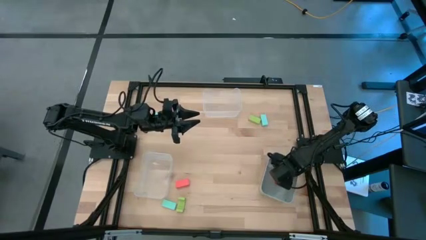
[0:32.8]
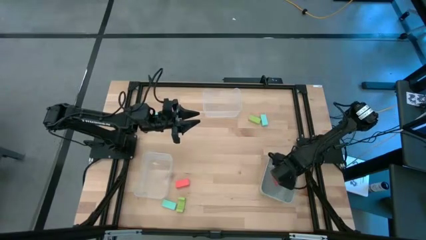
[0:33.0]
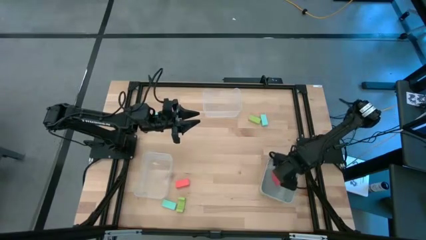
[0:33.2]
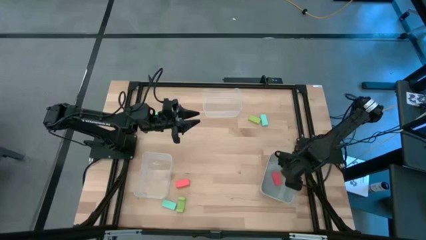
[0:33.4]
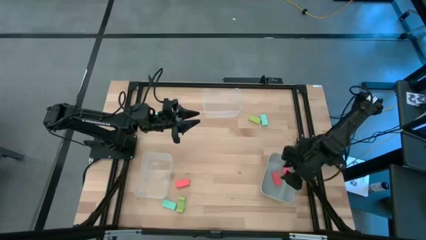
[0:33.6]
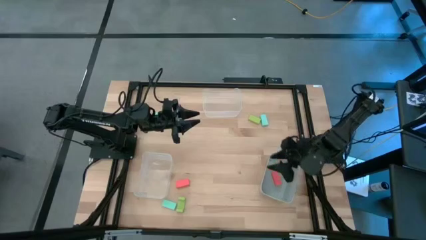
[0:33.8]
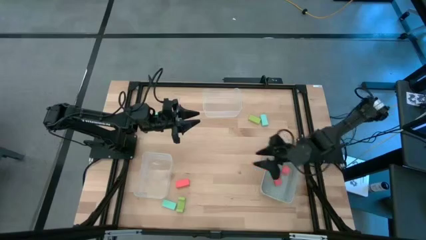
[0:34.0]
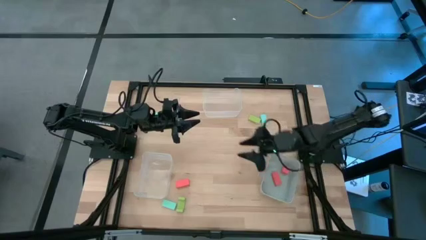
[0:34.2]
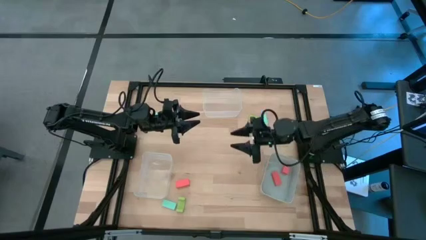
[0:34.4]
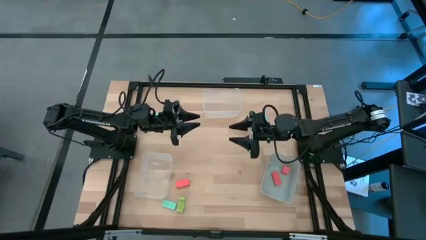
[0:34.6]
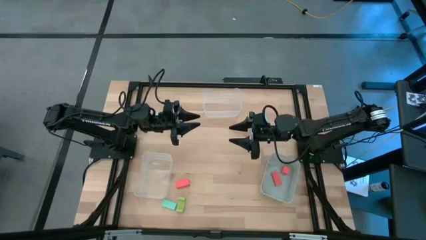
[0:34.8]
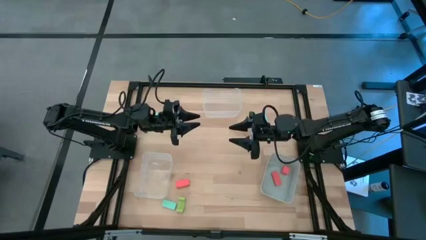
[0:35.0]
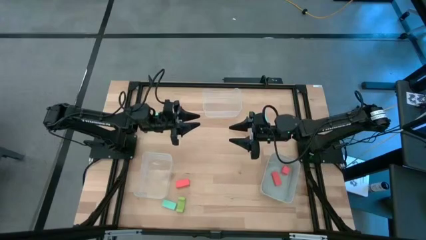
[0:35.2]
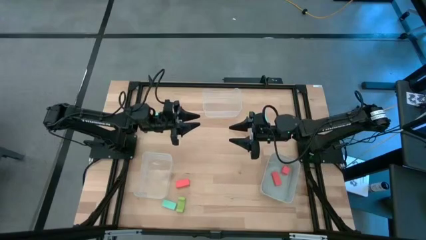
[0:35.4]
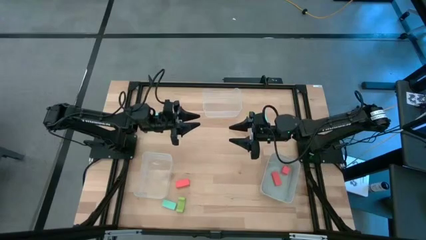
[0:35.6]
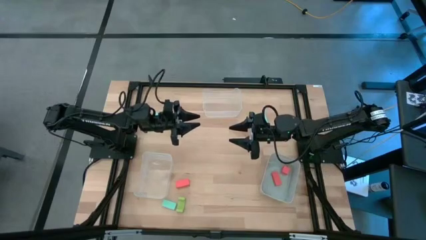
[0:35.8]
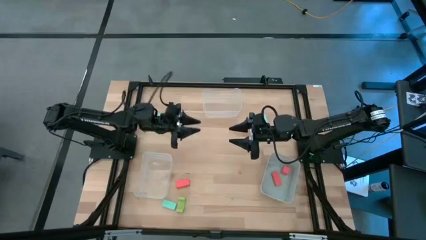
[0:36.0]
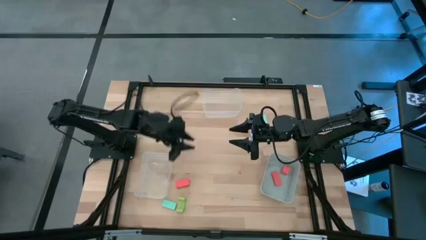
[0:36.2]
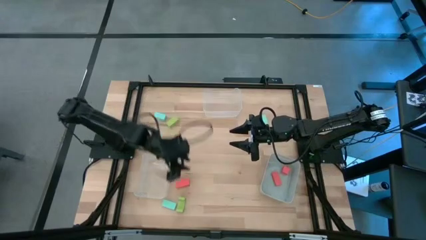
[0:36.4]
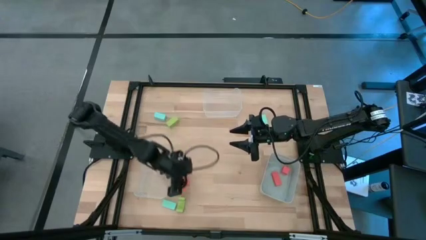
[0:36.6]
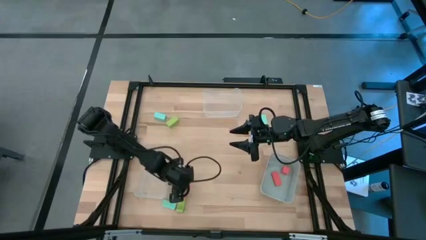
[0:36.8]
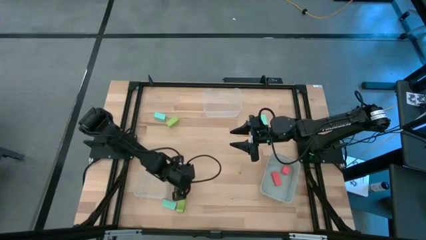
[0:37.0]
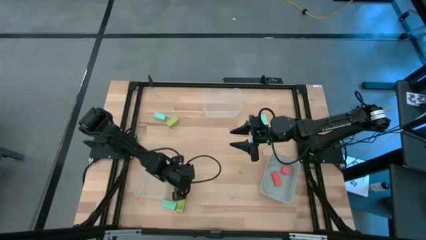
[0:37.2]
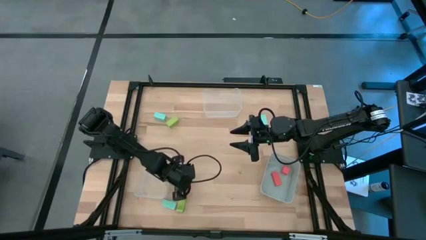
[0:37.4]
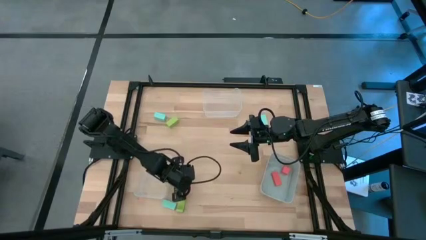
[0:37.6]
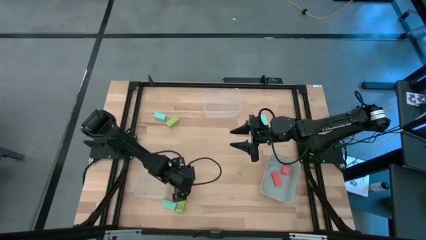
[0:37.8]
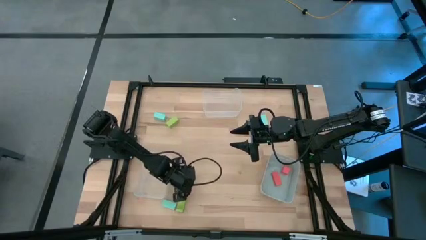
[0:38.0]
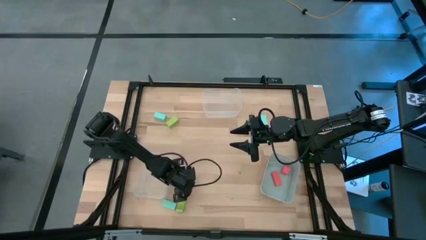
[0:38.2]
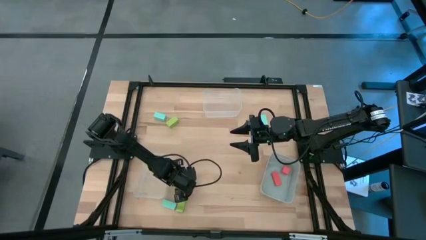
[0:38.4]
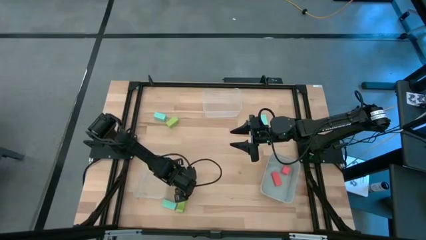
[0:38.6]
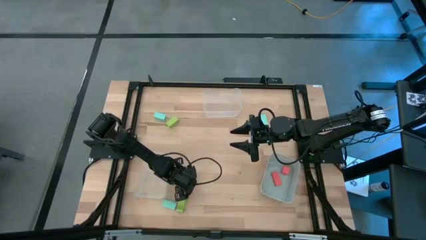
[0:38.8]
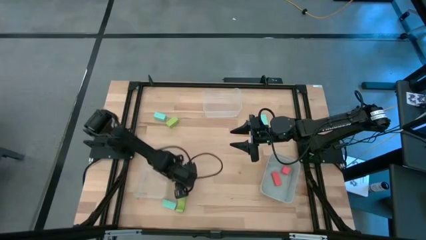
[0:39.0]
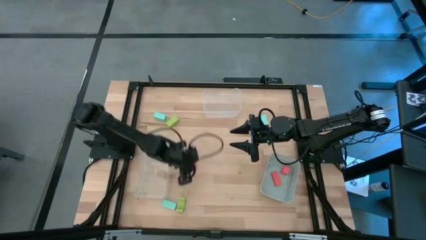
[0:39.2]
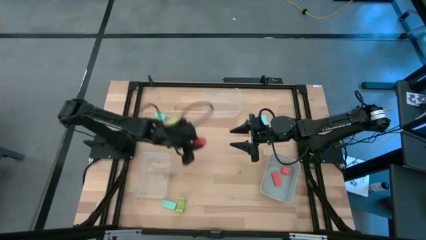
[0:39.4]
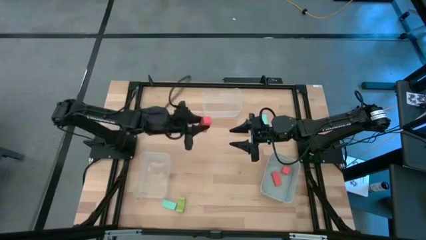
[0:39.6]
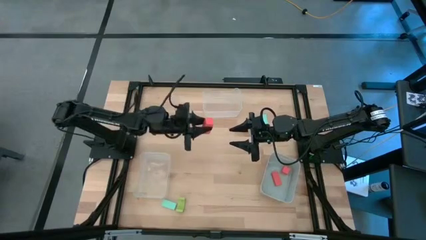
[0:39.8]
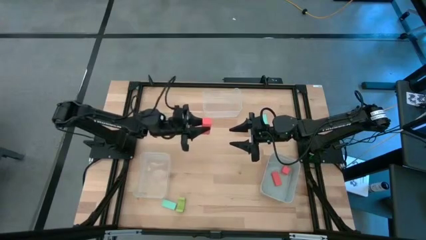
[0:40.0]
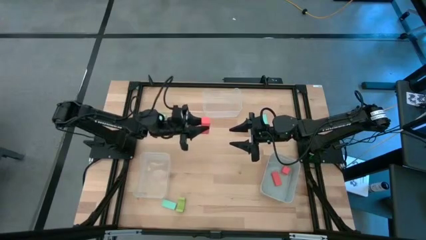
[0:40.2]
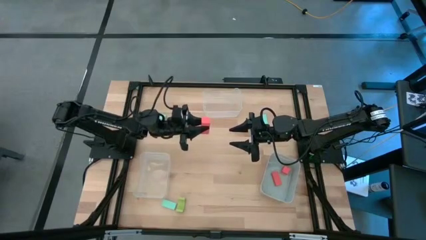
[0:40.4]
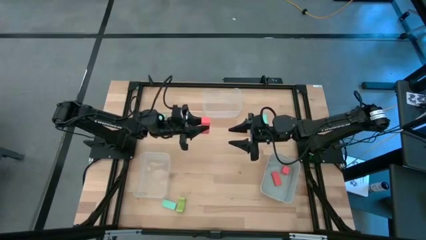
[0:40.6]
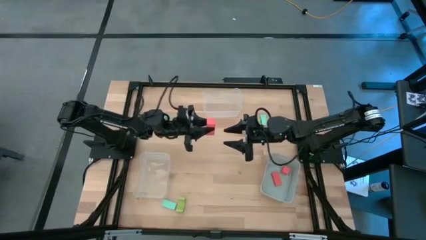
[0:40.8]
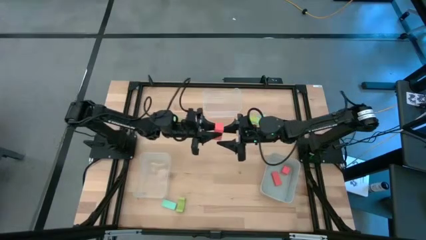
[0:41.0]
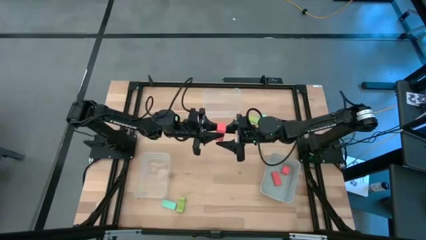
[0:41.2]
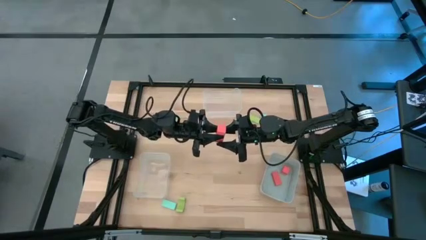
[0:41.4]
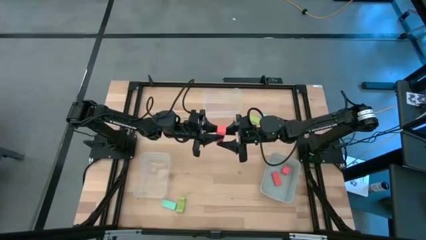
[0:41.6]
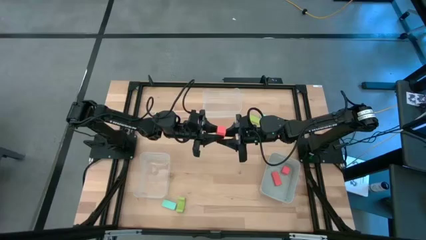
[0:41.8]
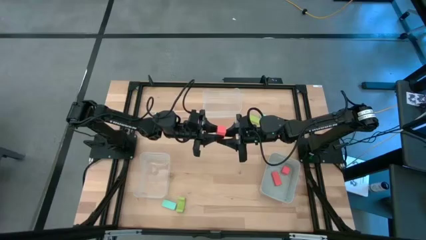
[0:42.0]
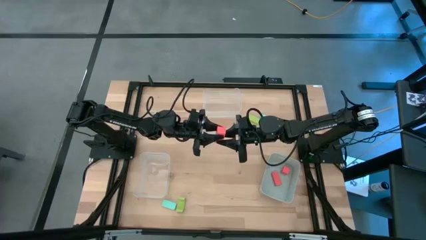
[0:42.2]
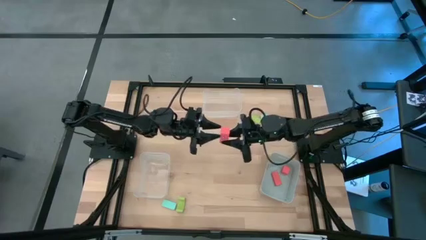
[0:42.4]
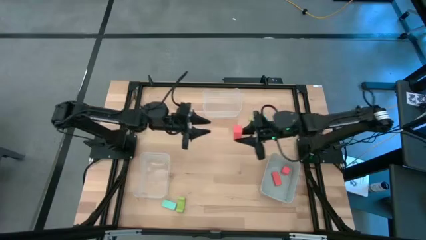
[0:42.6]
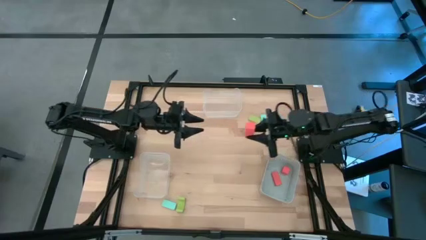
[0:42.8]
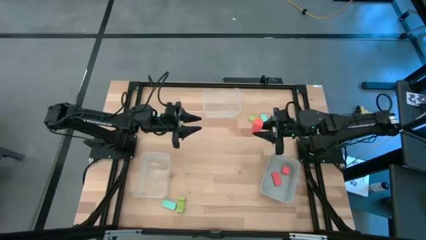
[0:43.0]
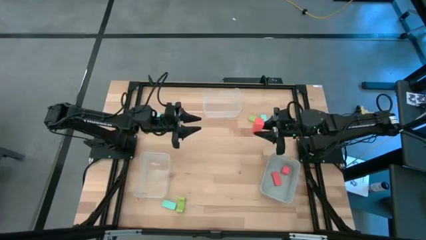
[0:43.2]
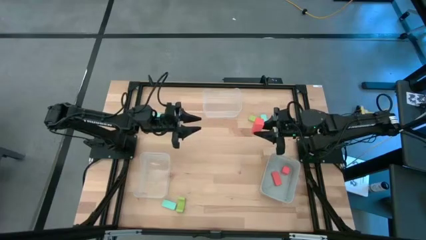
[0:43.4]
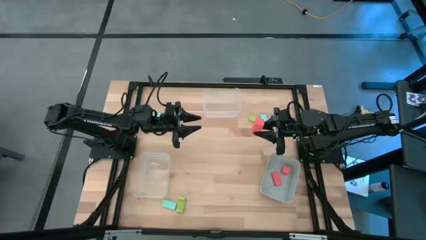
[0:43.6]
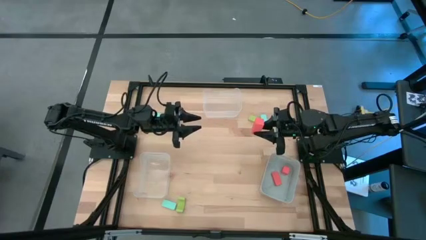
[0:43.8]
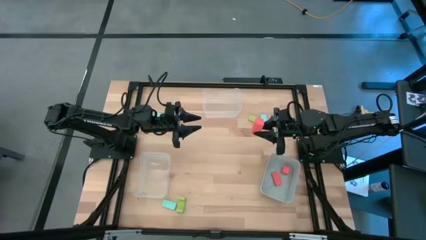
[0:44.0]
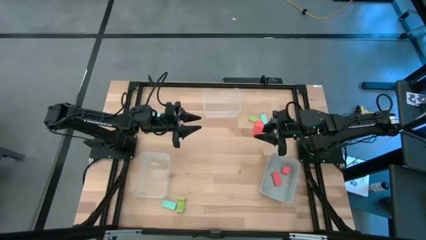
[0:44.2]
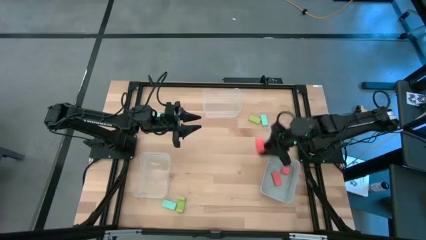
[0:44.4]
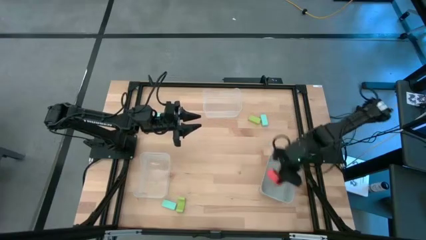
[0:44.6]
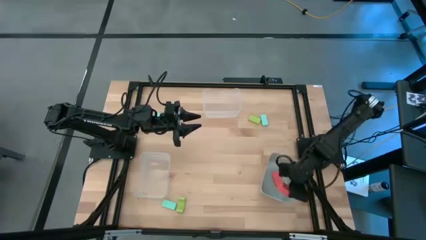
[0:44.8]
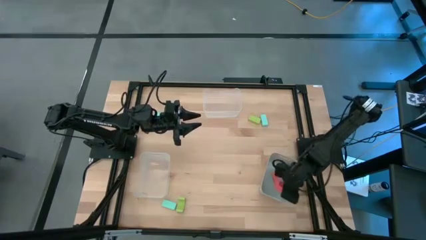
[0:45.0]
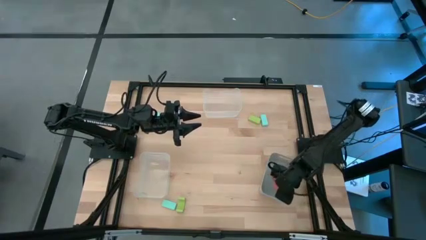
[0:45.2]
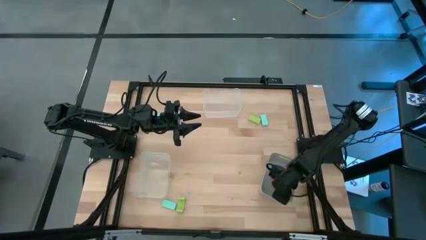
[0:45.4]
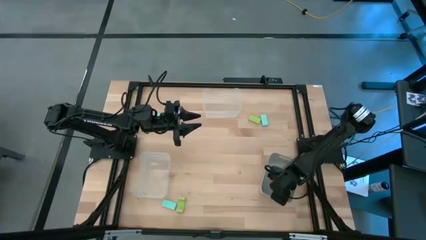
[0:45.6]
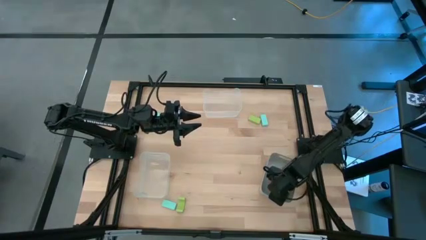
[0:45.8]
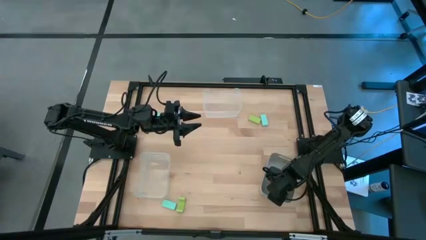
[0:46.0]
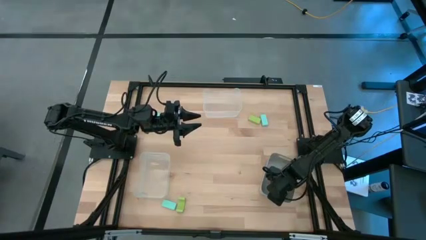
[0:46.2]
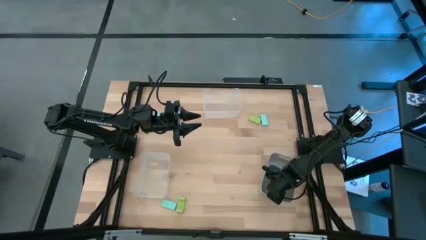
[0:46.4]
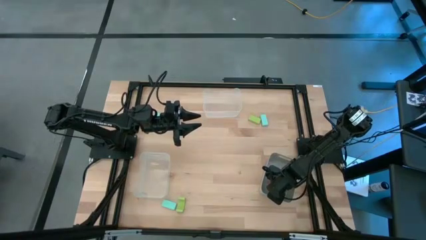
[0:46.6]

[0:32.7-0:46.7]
Task: Sort & place blocks by color
Put the orange block into the gray bin
